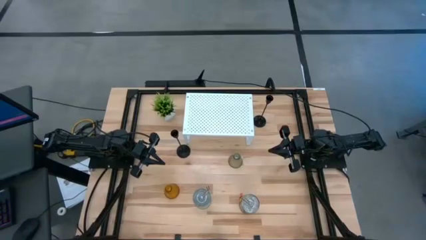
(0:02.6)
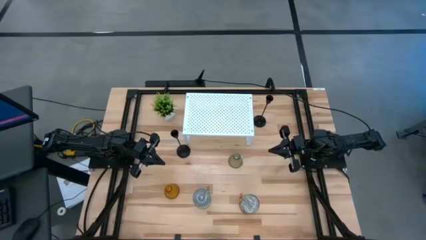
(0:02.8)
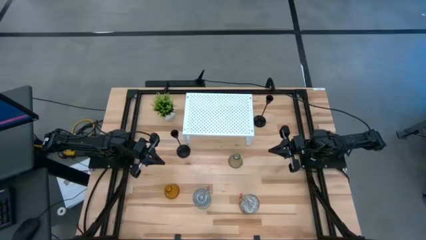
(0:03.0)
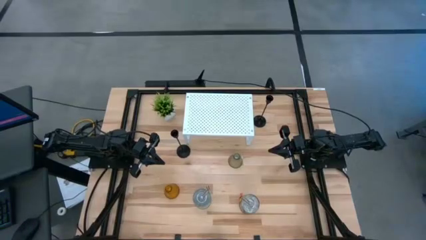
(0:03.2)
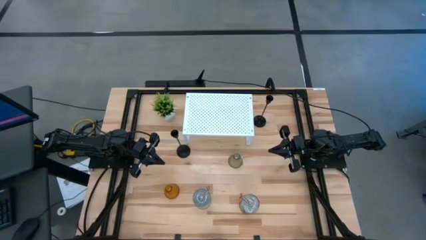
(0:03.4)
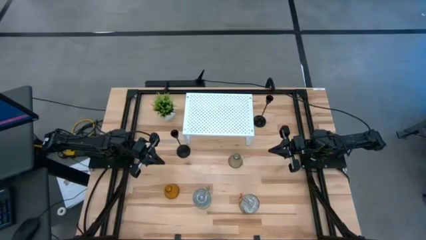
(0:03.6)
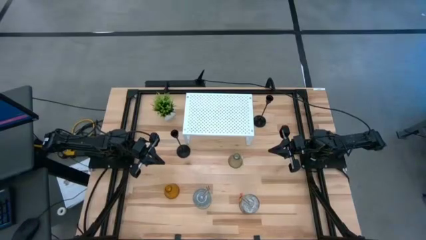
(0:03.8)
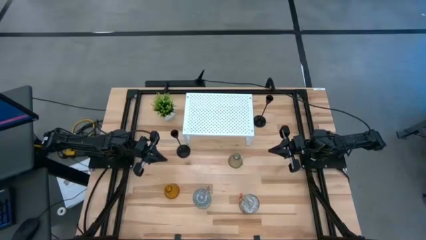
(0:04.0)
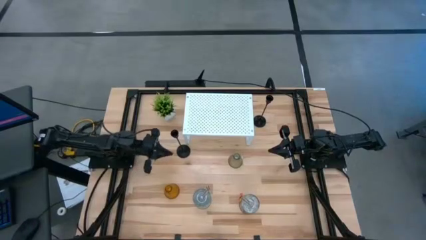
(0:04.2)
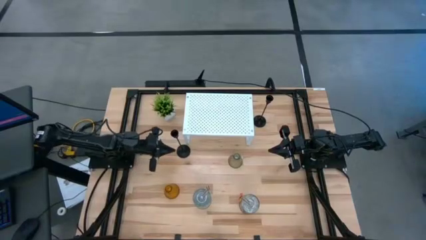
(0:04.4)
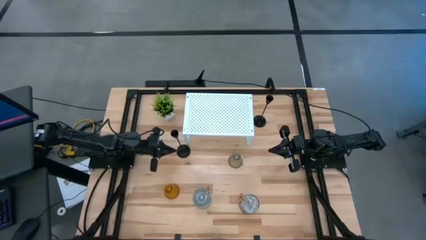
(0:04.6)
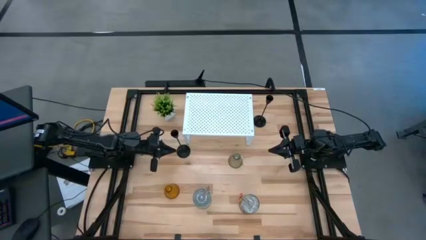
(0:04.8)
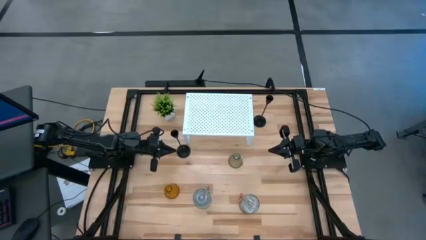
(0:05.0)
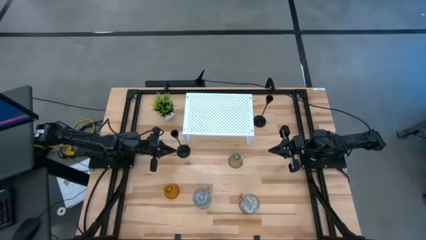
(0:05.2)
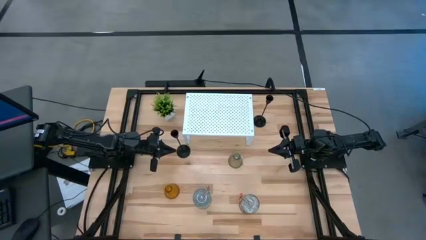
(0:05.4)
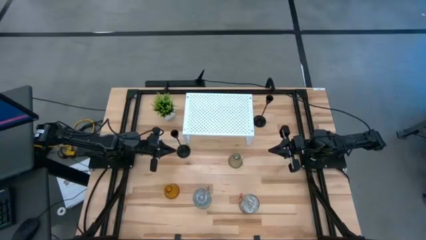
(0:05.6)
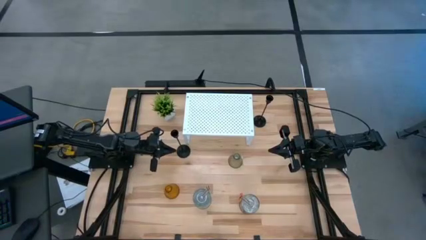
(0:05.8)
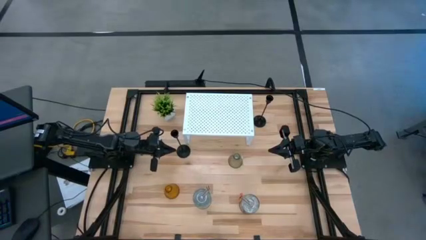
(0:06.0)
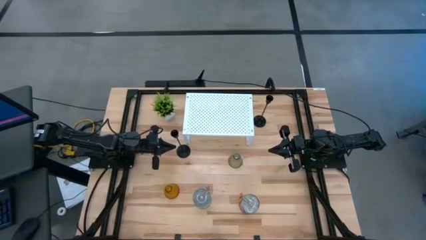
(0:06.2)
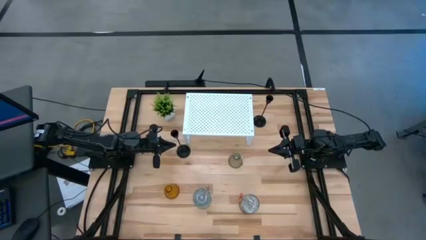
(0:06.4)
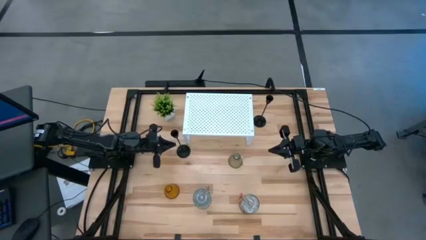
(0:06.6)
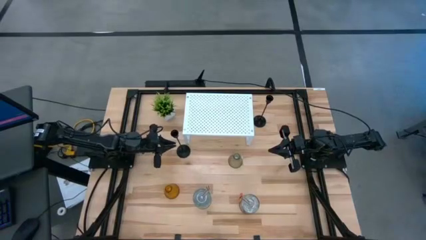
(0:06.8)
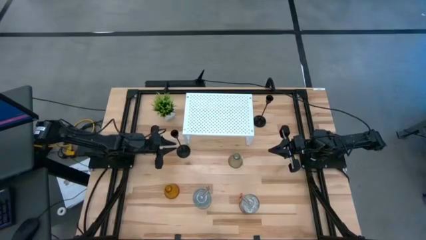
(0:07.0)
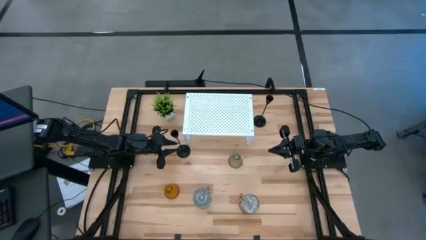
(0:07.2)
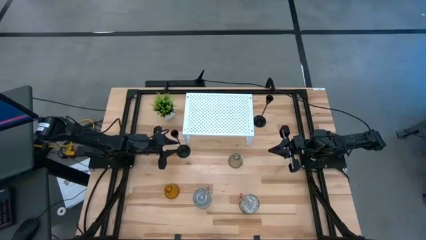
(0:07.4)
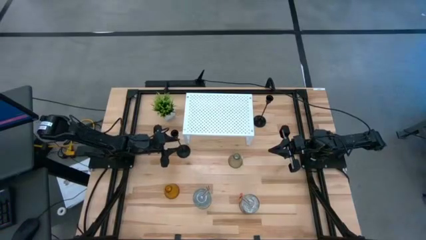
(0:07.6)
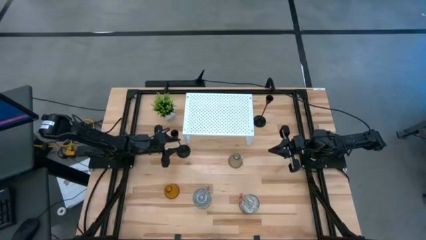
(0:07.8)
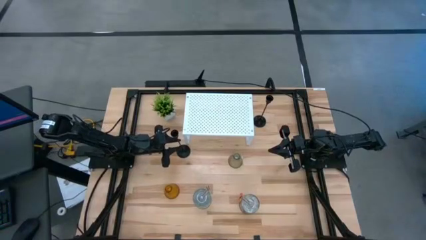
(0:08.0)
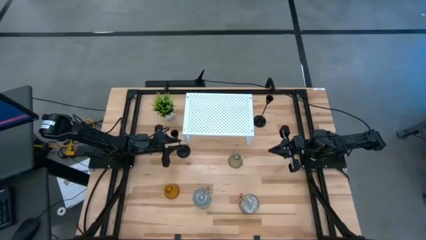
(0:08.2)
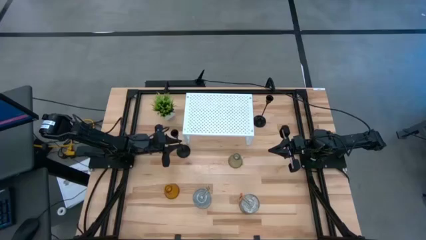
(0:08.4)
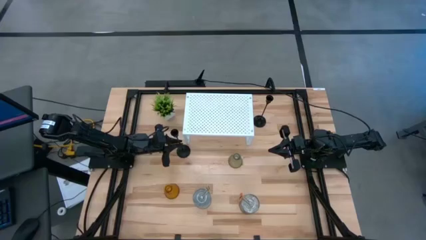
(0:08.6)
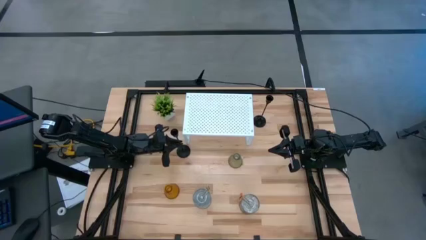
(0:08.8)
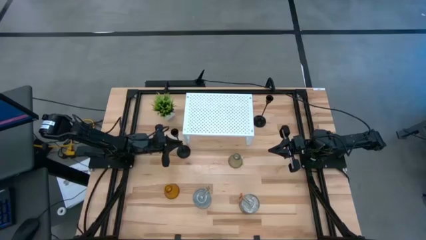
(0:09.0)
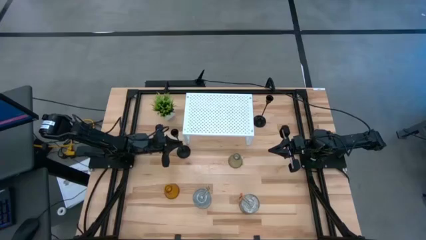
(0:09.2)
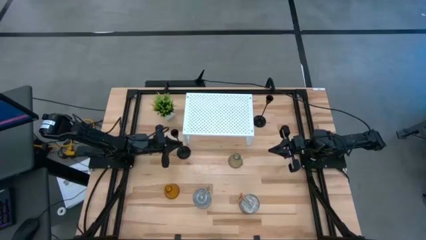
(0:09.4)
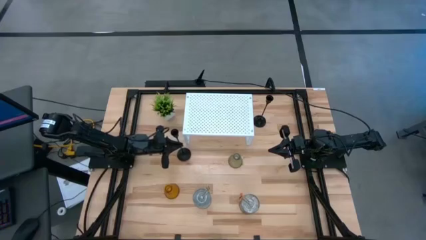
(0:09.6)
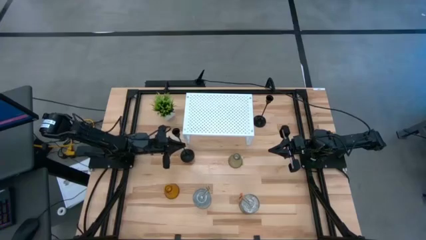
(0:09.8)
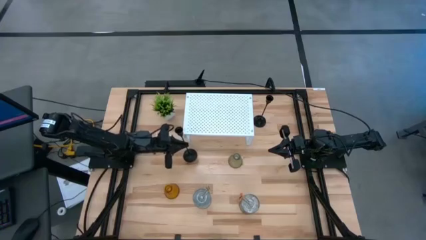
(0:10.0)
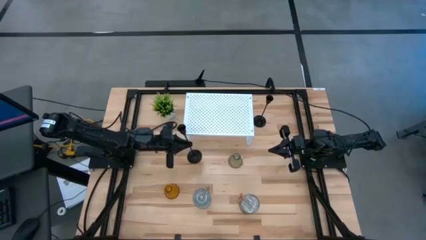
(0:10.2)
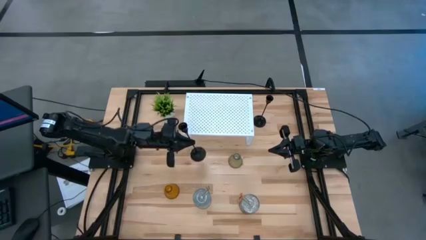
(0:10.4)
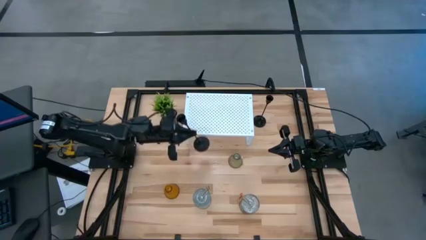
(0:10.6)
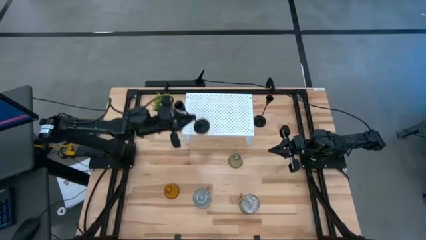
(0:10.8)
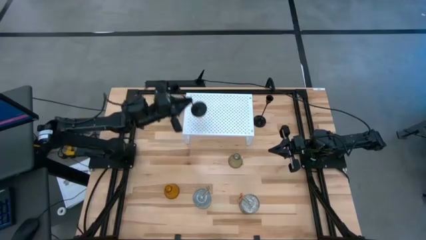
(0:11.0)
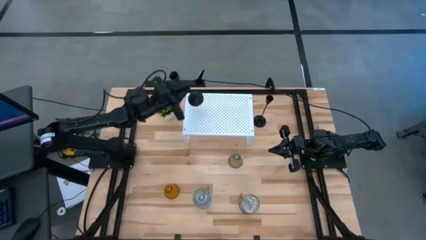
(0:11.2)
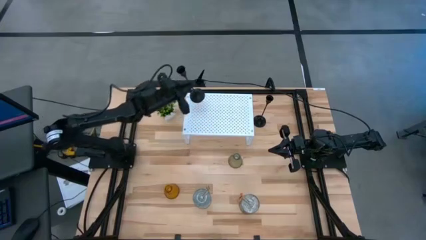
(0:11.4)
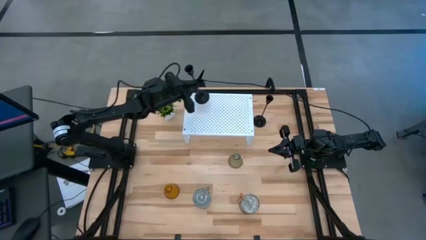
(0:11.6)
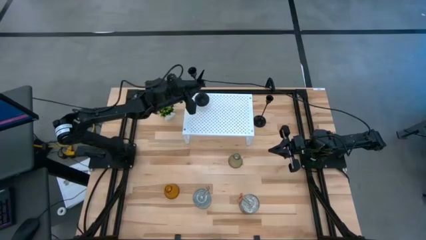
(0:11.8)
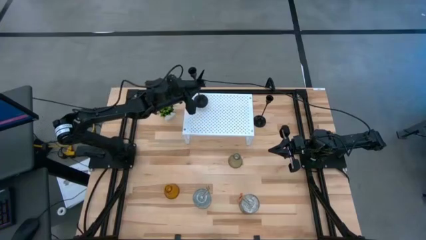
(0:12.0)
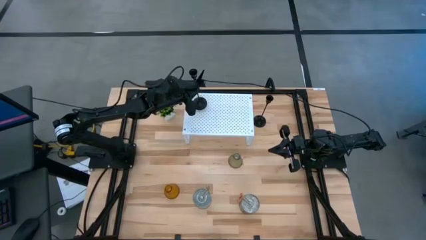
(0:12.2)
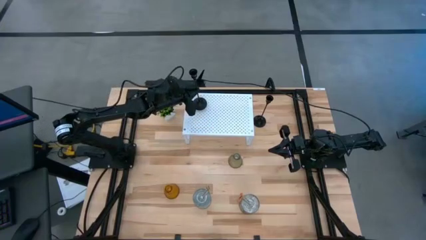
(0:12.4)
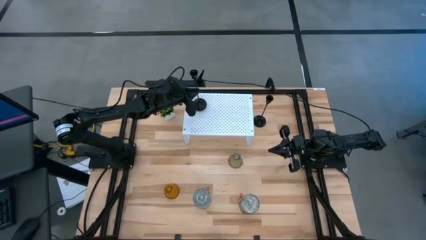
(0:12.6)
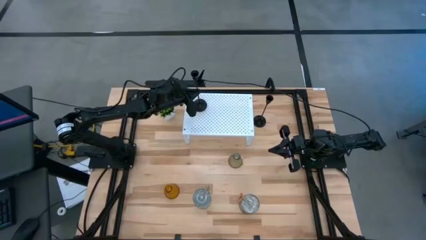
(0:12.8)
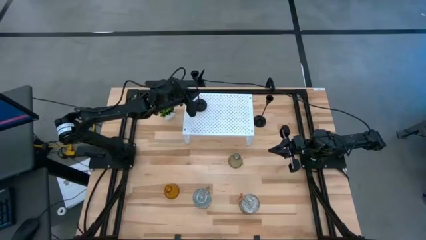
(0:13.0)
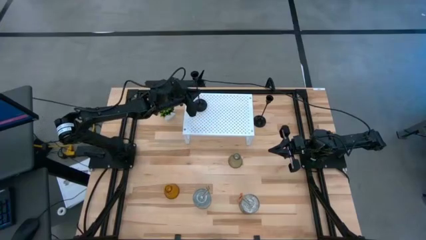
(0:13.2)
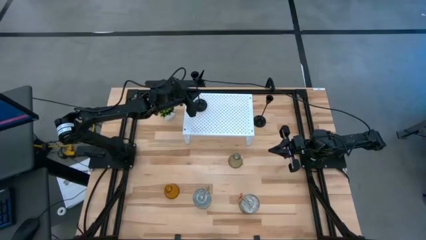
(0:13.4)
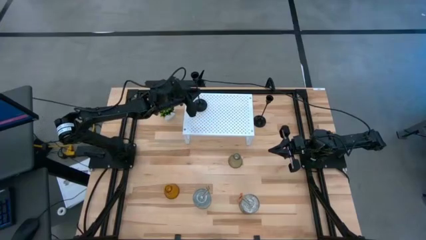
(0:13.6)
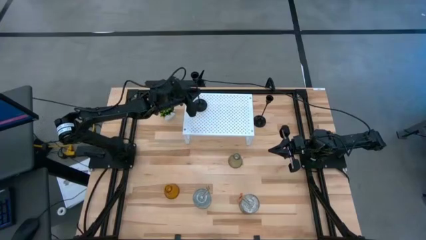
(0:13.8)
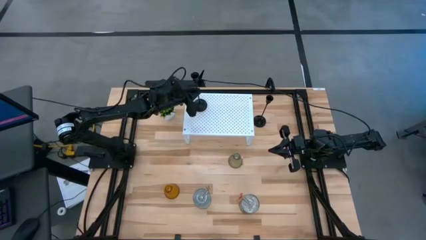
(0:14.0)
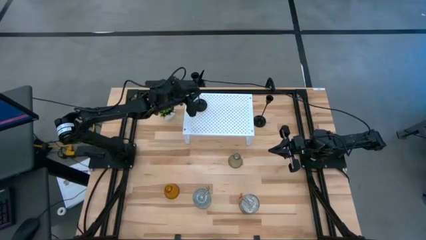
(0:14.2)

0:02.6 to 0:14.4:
Task: Pick & Place candle stick holders
Put the left black candle holder on the shelf
